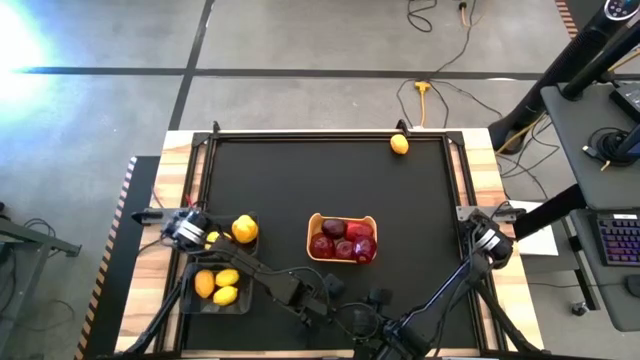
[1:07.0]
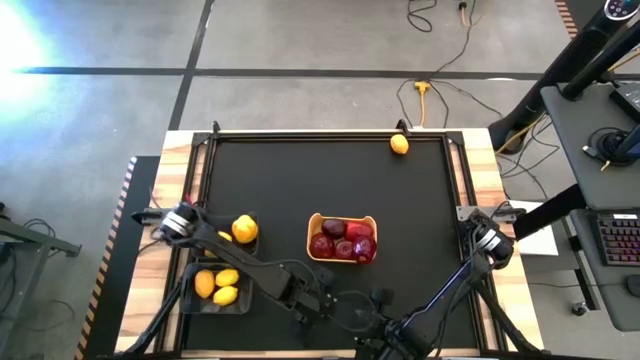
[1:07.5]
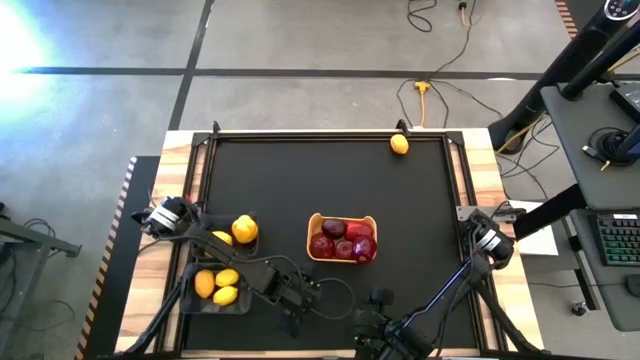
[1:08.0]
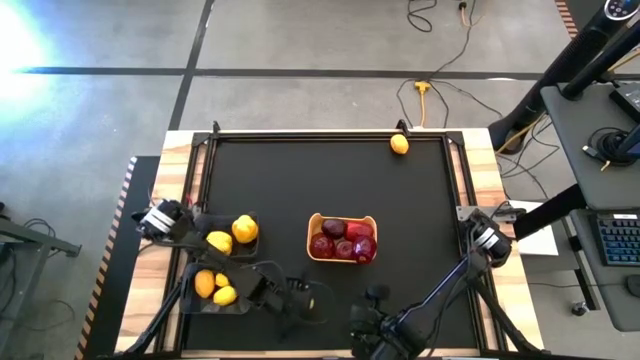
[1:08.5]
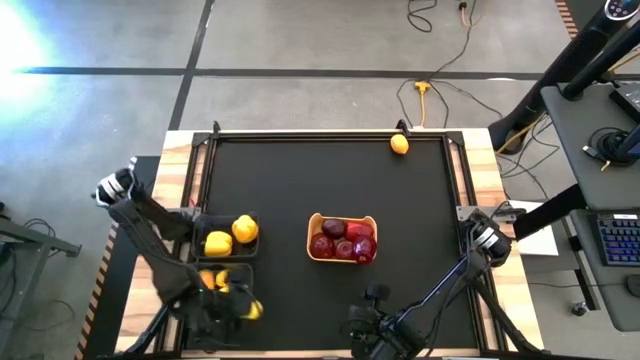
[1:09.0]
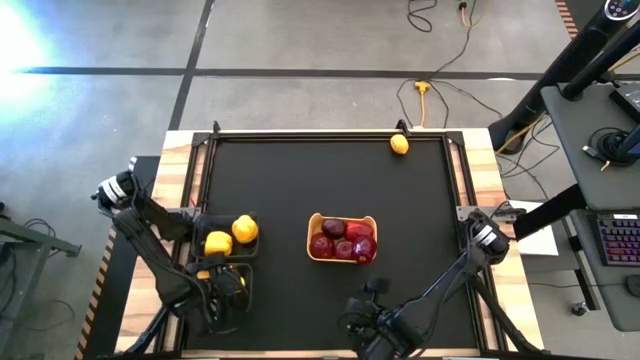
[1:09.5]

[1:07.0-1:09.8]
Task: Sort produce into baskets
Put the yellow lemon into the bottom black transparent bin

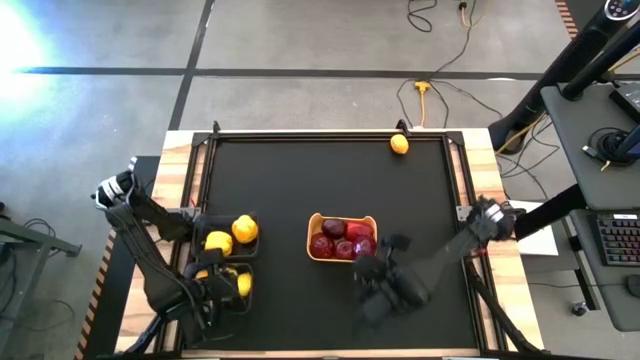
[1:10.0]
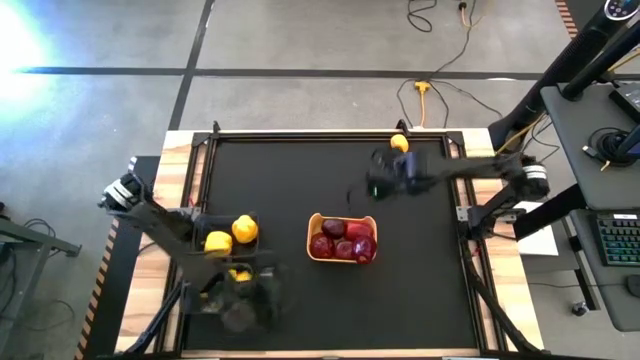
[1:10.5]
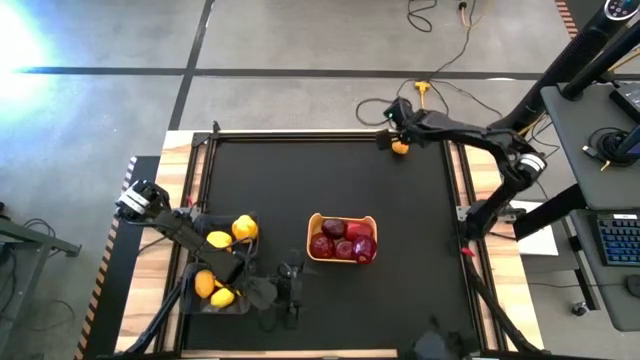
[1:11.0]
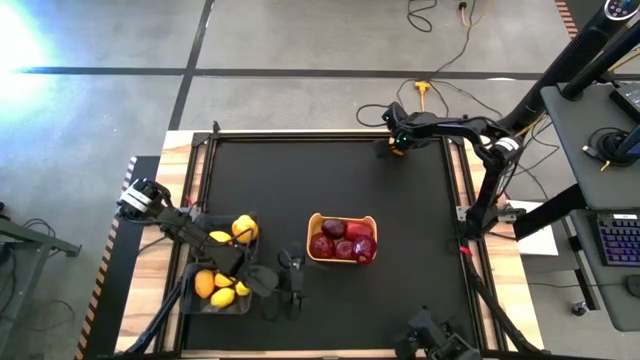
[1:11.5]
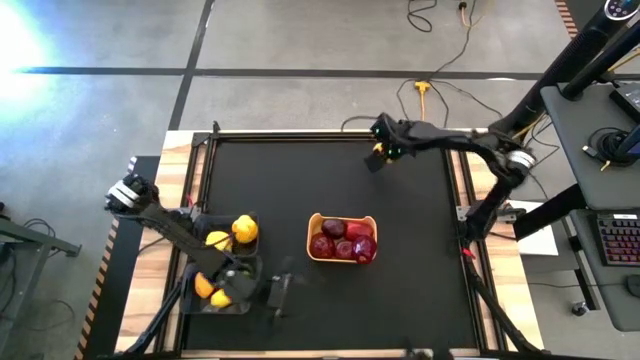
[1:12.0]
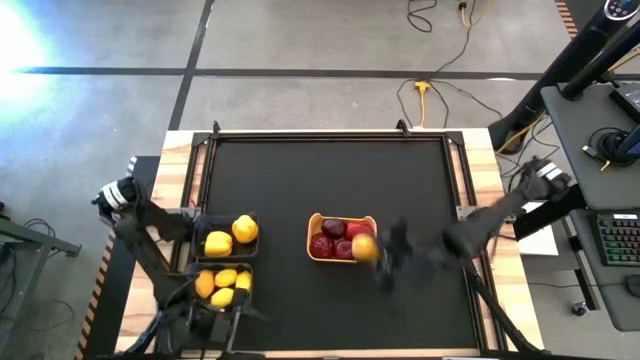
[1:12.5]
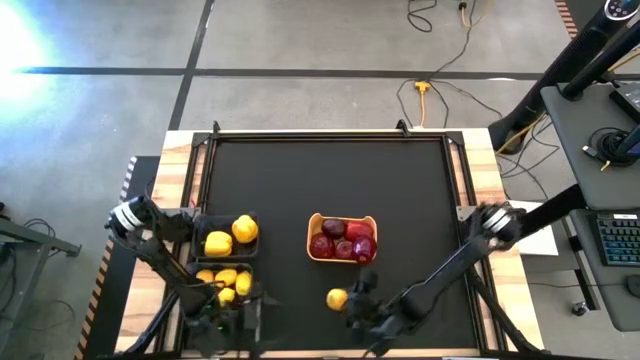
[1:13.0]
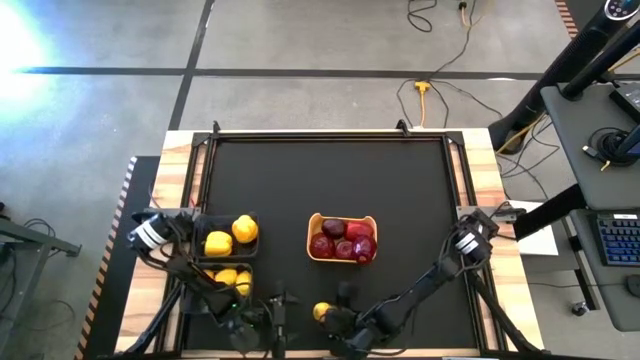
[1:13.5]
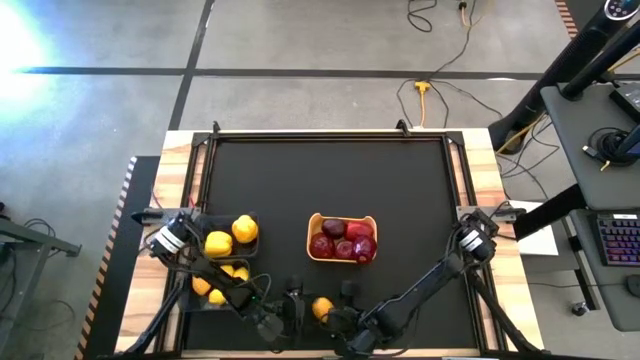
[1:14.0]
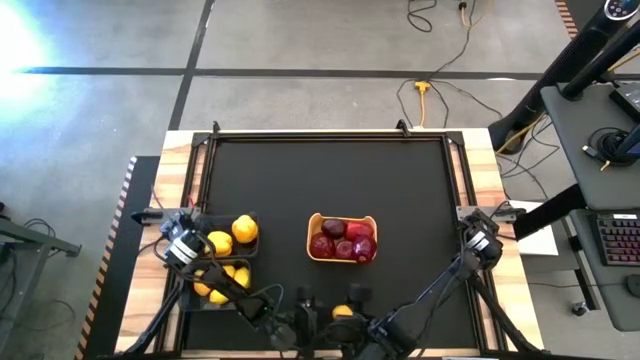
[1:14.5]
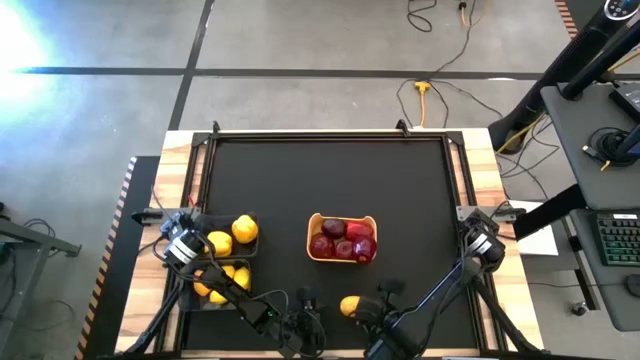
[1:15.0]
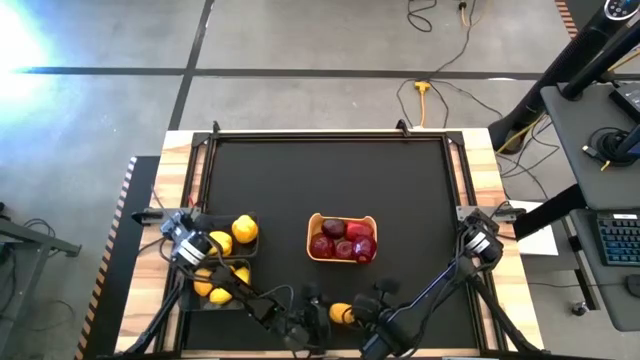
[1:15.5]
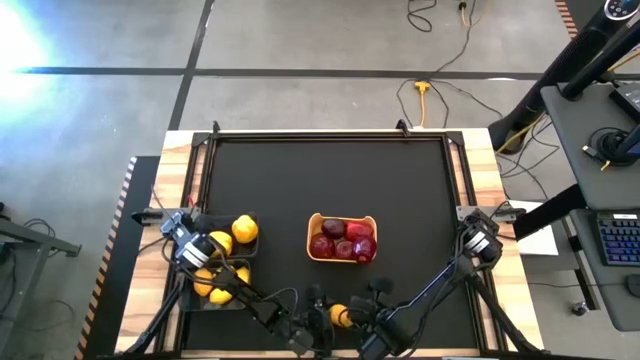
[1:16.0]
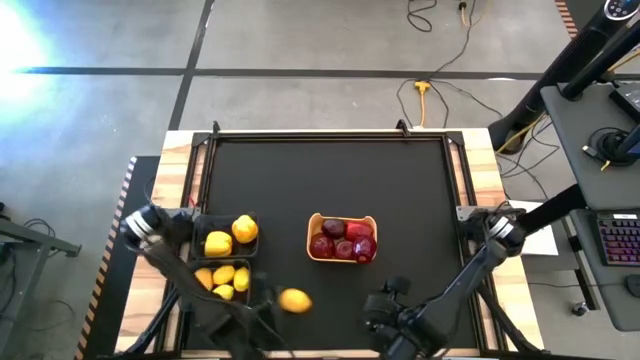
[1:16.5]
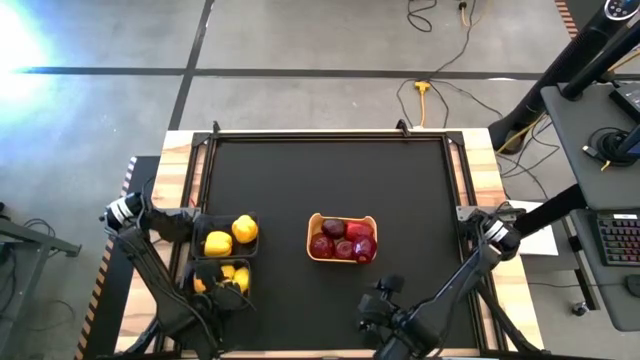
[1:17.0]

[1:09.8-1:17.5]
Put the yellow lemon into the bottom black transparent bin

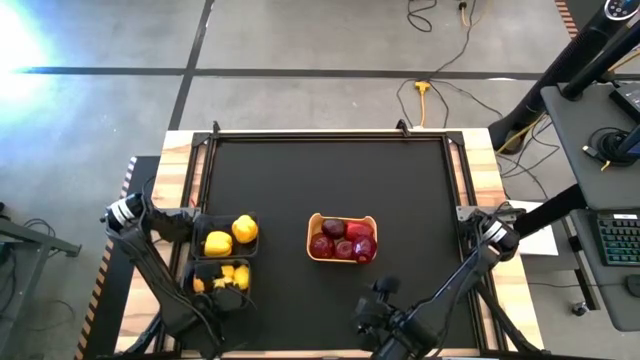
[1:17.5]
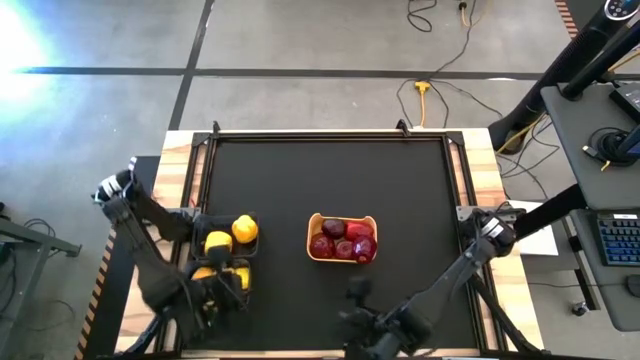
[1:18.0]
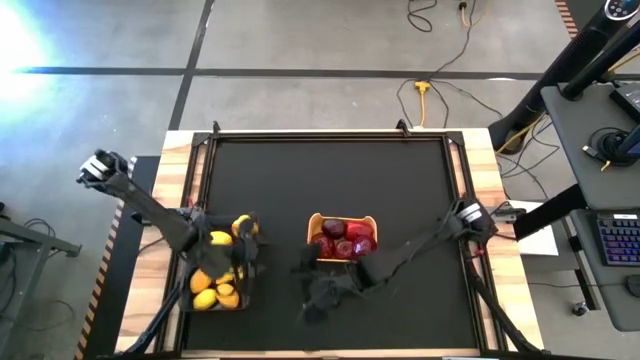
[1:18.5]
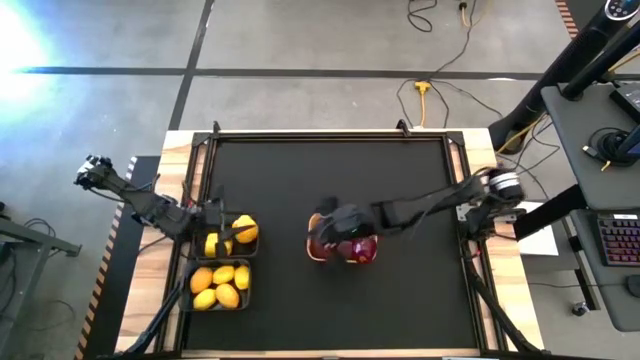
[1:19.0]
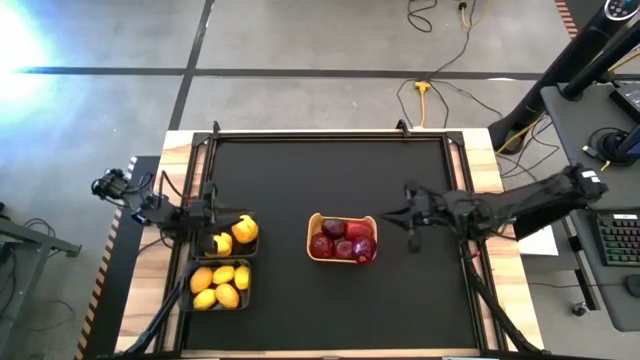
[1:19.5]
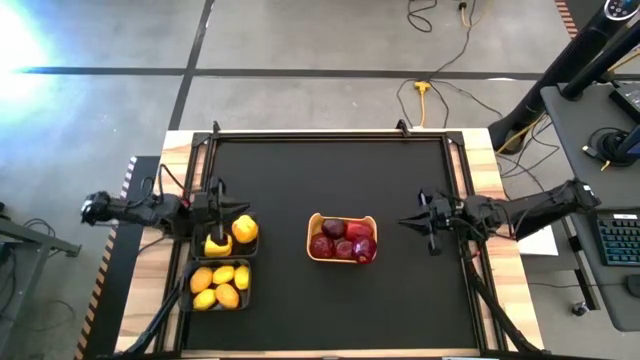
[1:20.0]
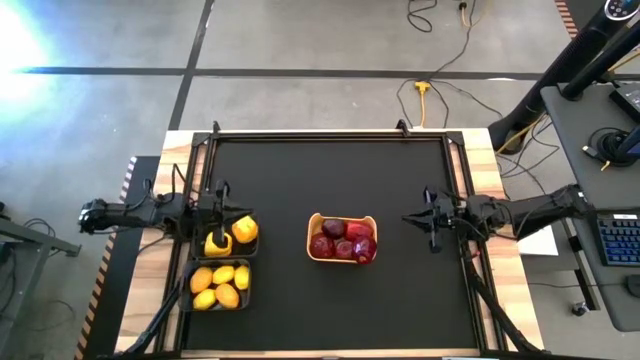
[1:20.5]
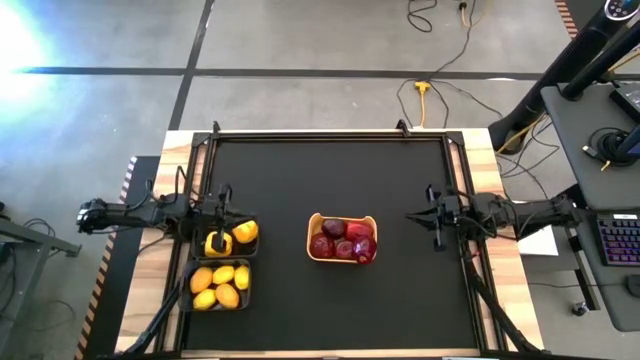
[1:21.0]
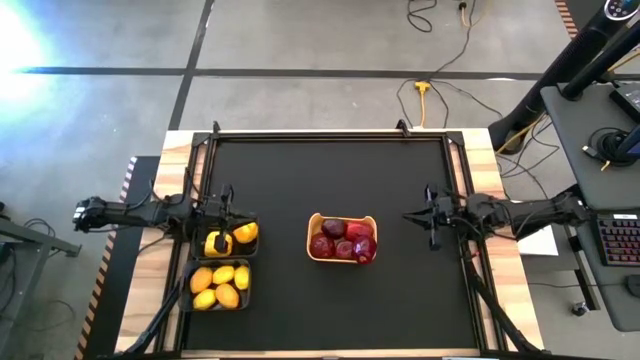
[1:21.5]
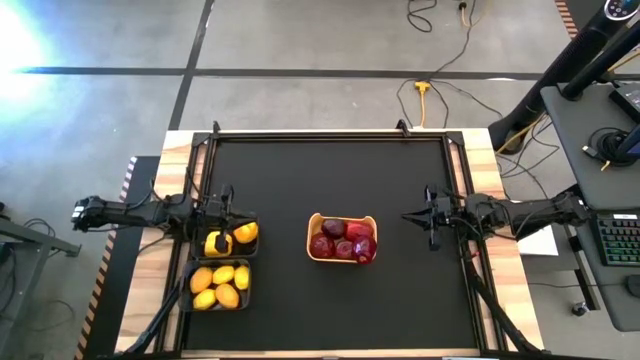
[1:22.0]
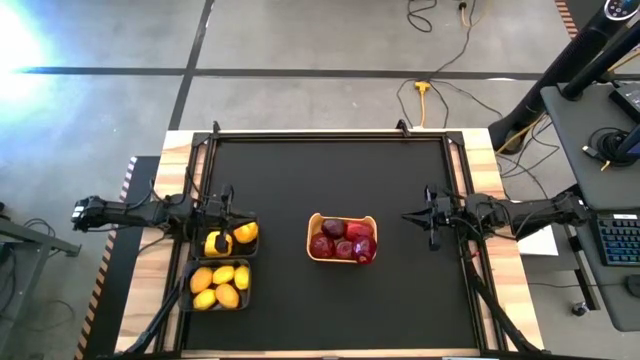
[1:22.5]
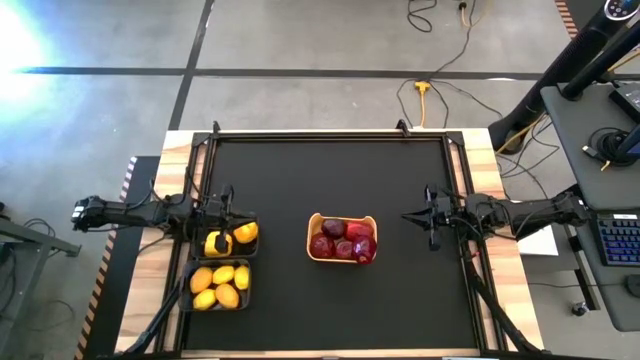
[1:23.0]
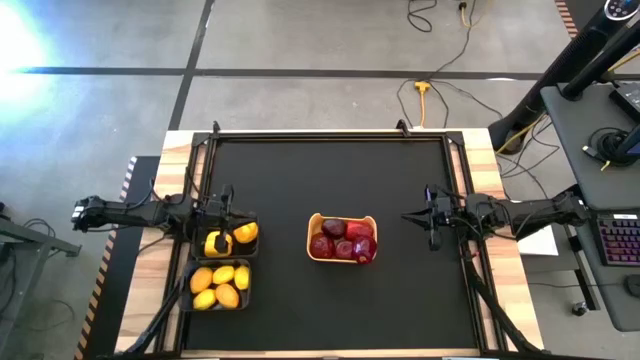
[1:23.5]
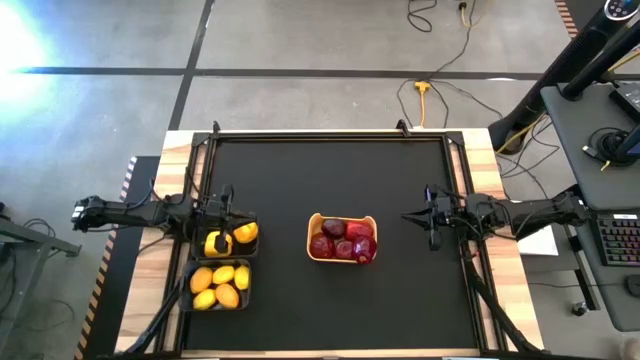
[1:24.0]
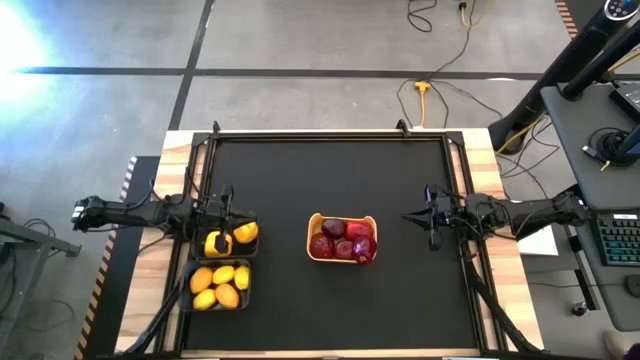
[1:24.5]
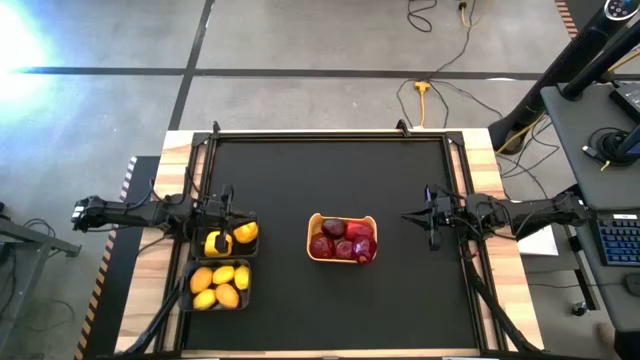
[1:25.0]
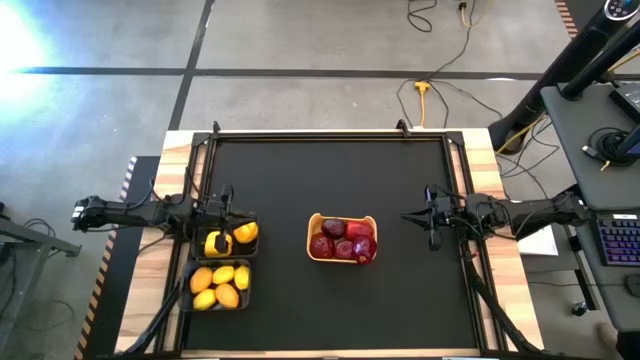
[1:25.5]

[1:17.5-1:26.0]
Return to Home Position
